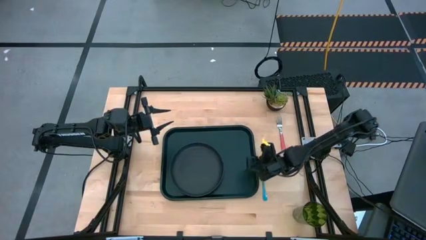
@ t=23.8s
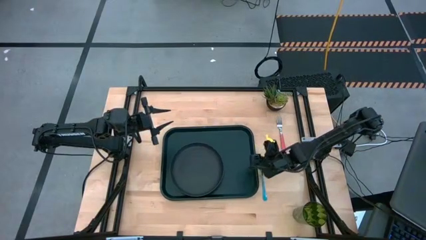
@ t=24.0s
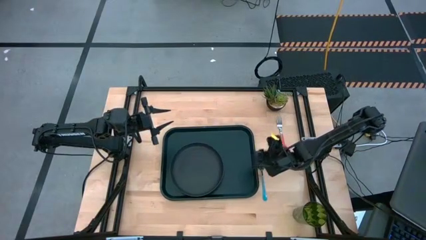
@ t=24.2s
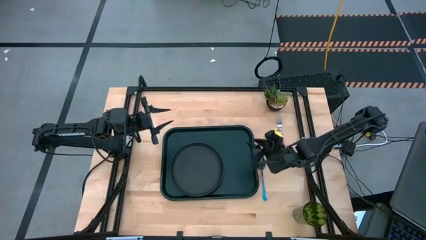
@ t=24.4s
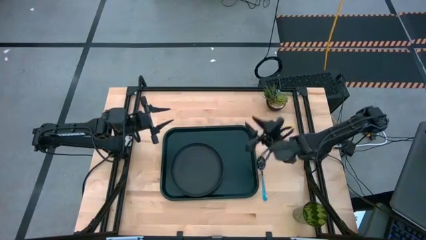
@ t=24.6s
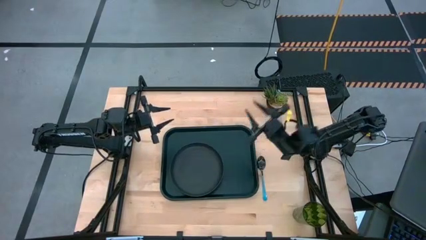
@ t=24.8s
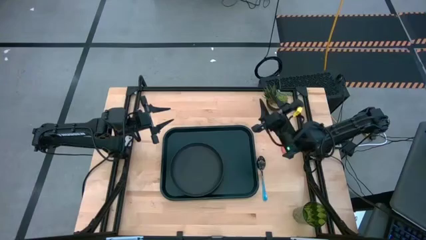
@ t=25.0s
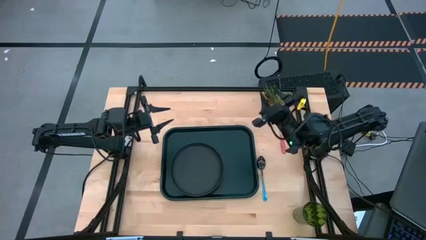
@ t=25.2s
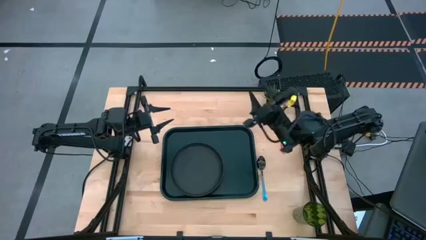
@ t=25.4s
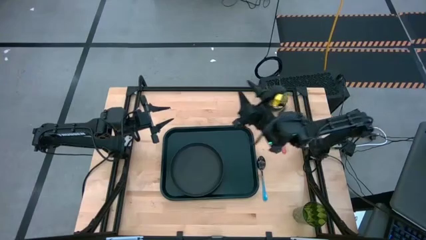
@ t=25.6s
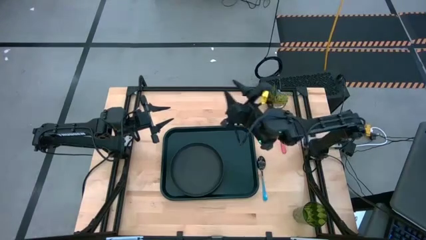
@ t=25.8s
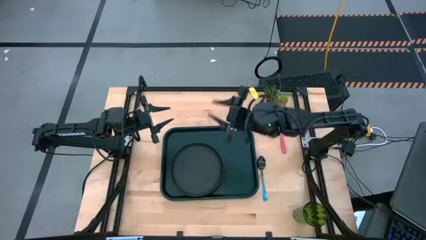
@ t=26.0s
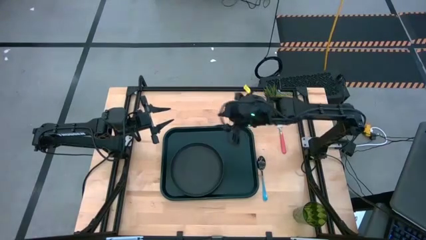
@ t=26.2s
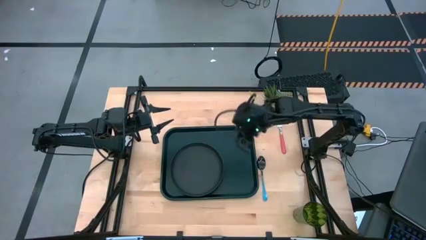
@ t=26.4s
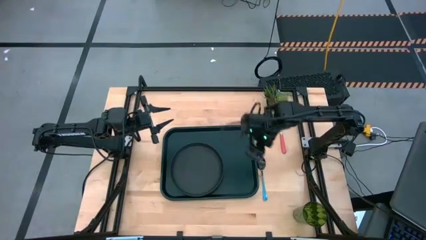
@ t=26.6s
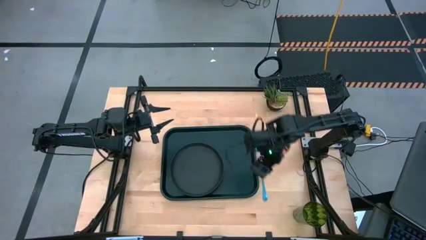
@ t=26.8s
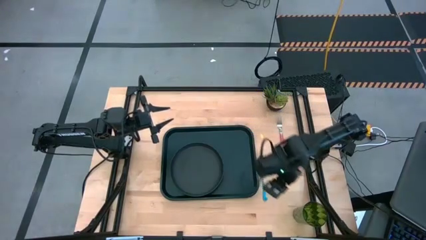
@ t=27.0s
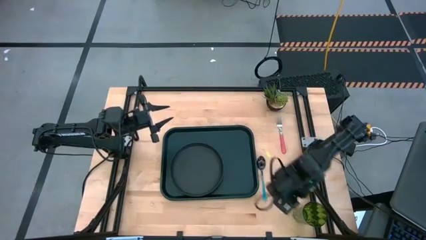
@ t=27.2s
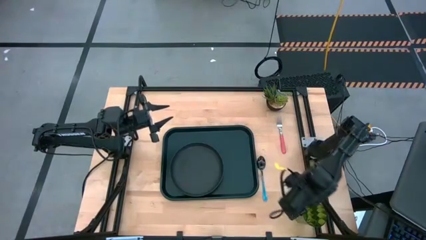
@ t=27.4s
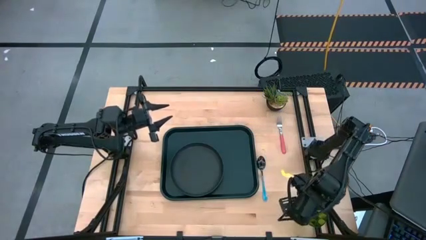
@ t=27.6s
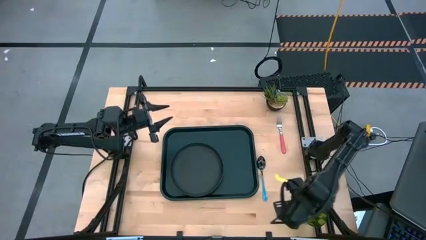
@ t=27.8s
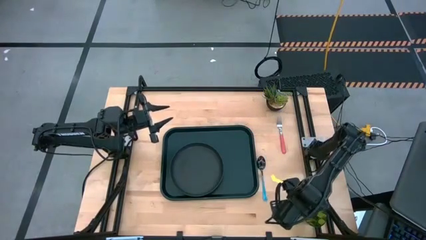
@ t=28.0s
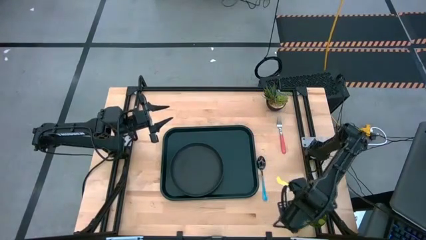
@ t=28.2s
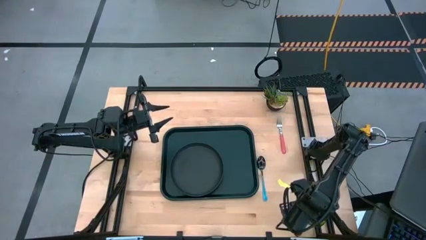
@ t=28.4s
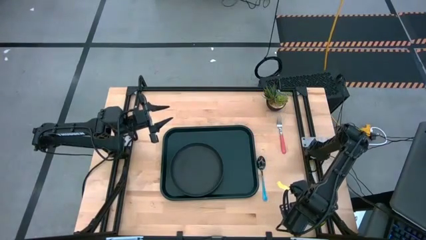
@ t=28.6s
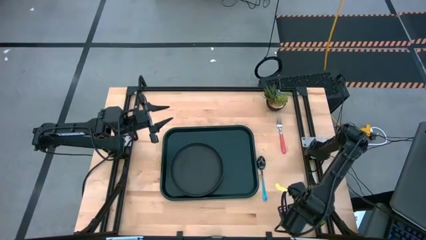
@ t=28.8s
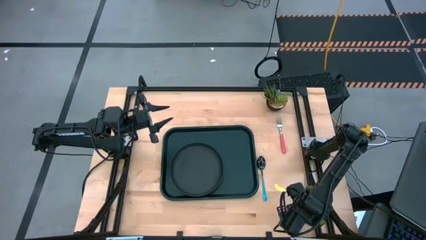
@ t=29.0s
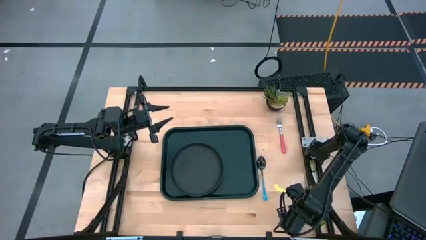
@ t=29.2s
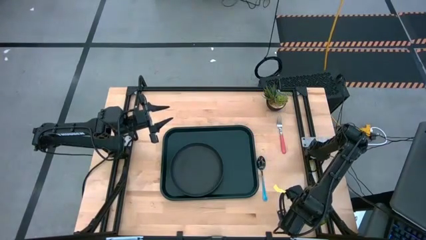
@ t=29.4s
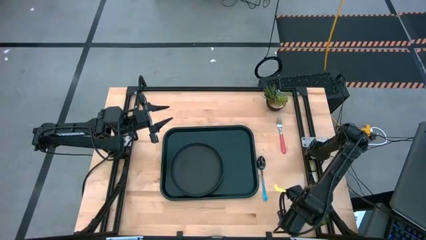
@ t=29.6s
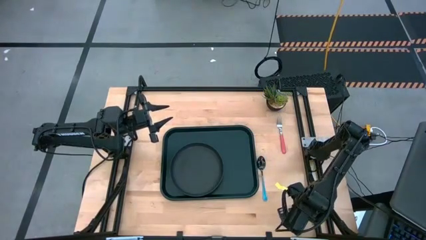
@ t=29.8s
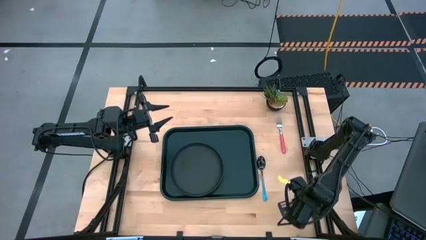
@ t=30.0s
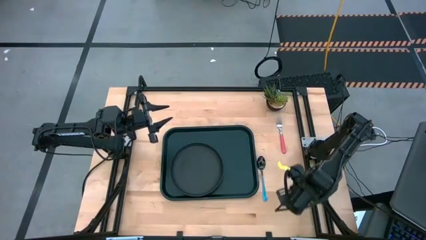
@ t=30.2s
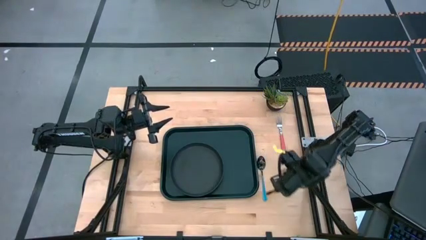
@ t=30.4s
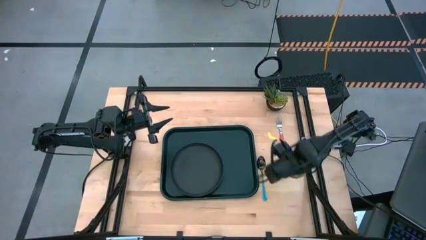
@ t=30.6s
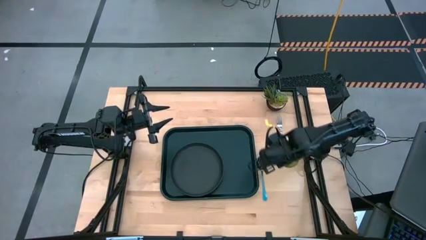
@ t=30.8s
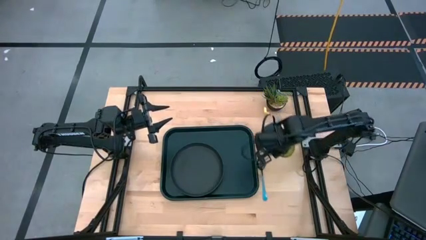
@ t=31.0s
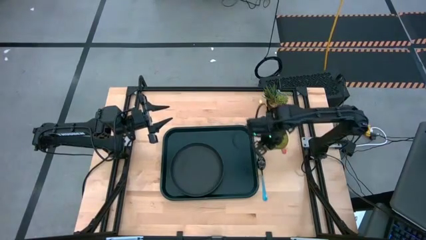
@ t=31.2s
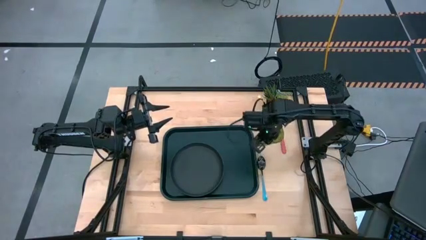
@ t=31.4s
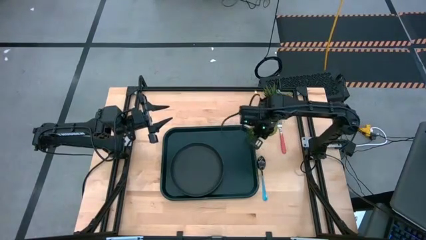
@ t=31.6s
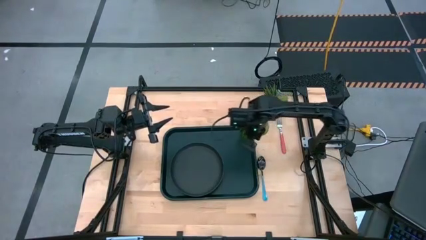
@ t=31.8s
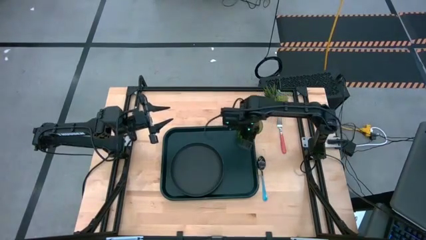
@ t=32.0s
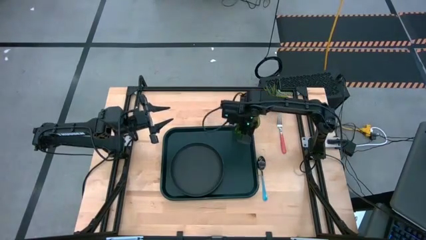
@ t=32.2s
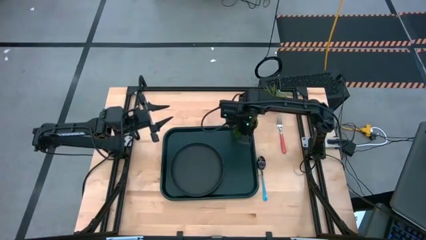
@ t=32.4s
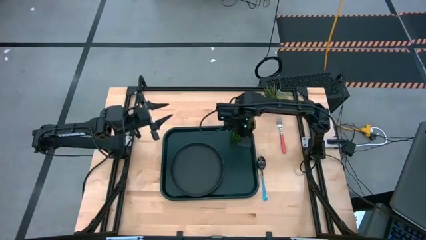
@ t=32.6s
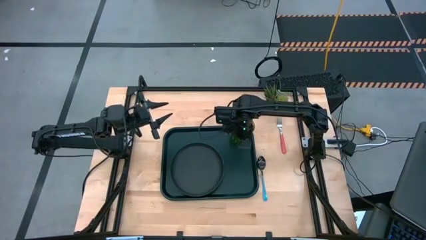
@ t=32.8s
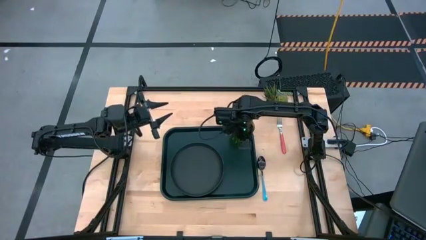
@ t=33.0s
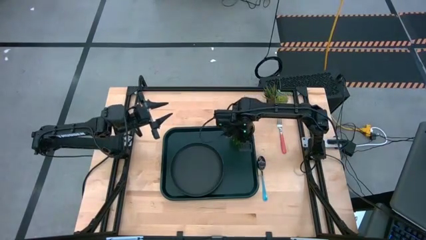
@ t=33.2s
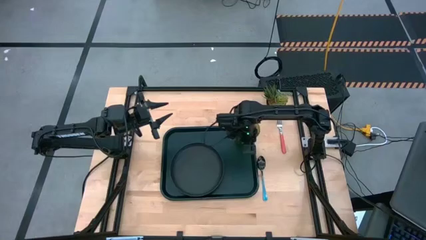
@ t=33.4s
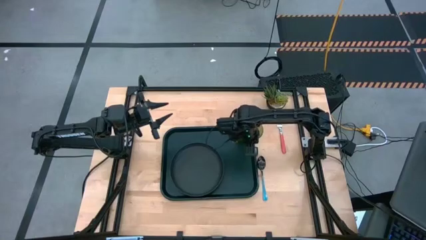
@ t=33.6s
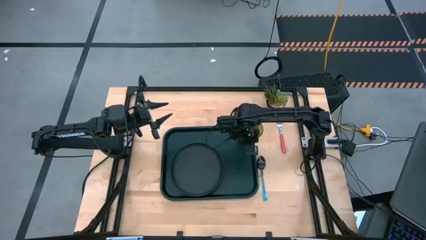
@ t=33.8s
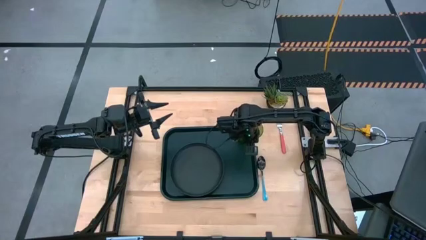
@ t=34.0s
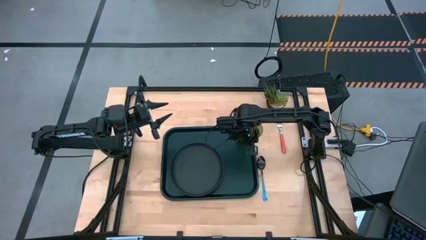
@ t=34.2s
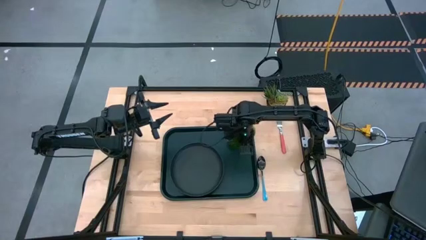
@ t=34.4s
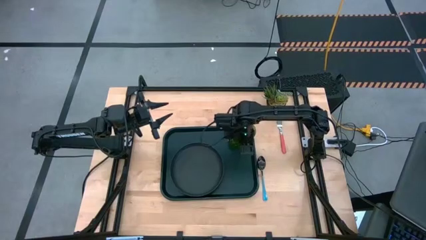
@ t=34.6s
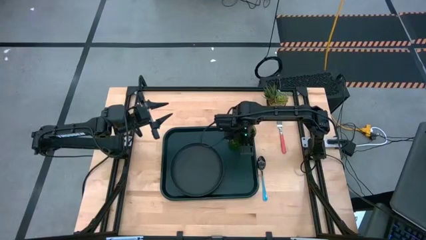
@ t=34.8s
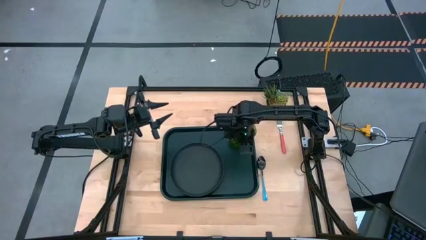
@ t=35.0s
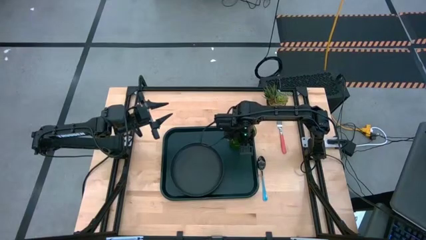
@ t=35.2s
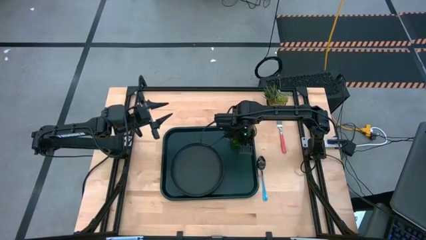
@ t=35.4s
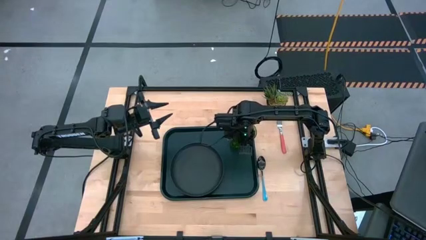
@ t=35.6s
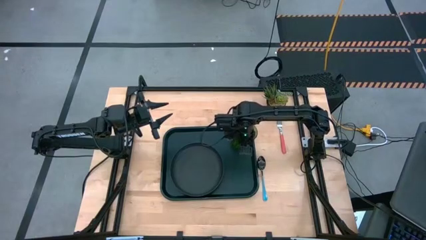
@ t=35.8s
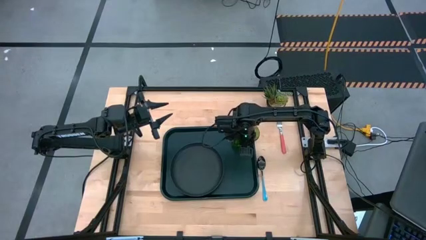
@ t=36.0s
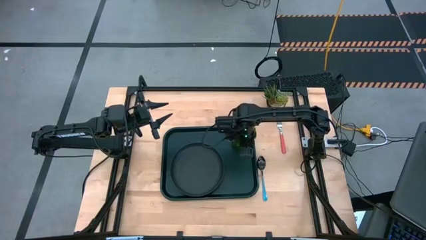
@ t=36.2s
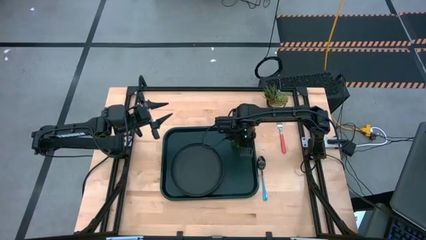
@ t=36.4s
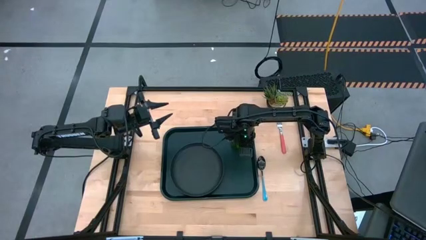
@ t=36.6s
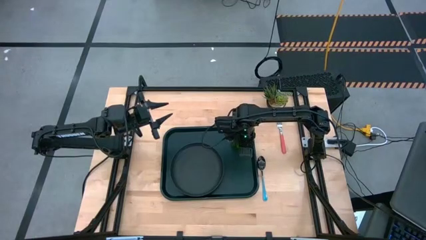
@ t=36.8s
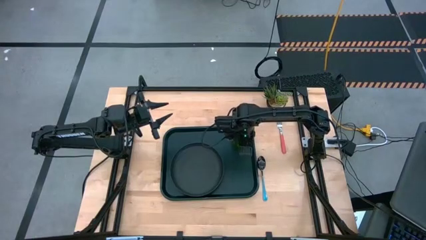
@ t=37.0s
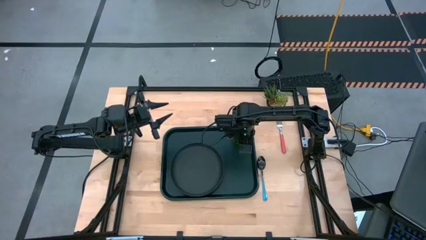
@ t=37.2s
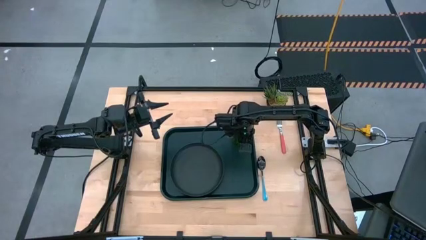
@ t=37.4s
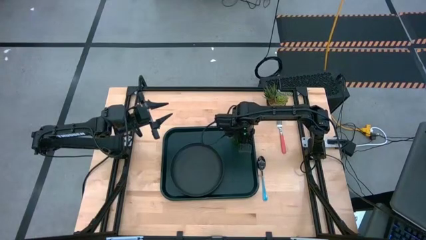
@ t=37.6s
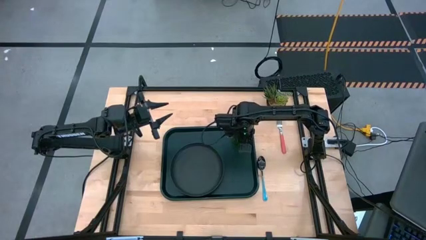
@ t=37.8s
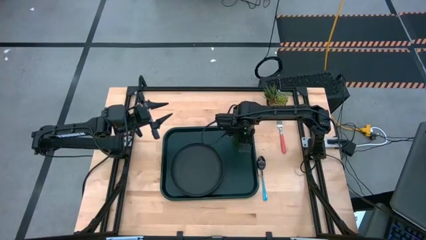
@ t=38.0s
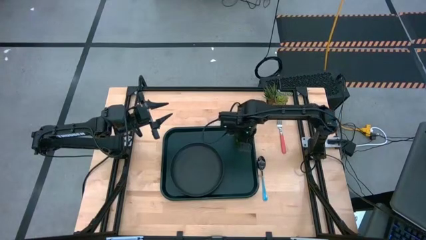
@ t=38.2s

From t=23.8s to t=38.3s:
Task: Pick and place plate/cup/fork/spoon on tray
Put the green cup to the top right of the black plate on the black tray

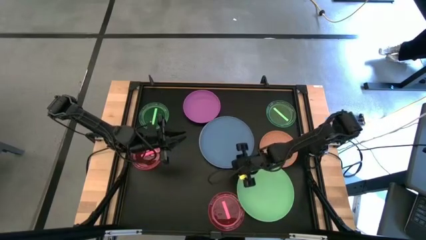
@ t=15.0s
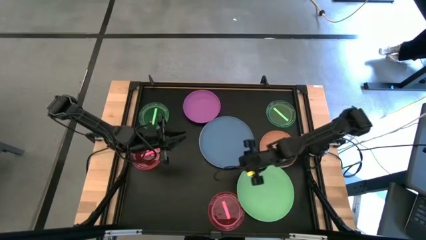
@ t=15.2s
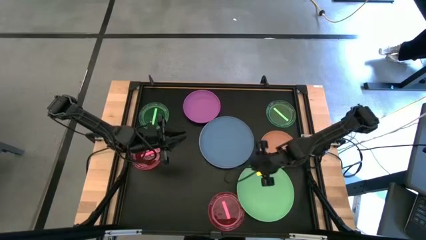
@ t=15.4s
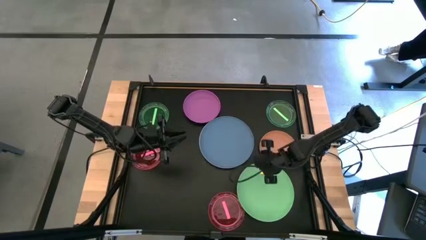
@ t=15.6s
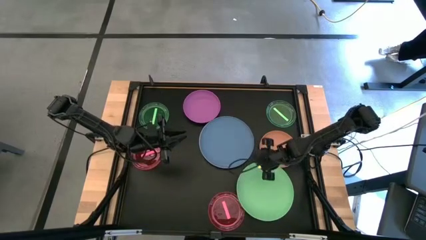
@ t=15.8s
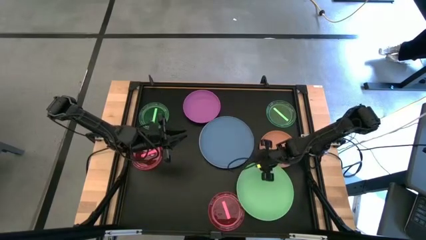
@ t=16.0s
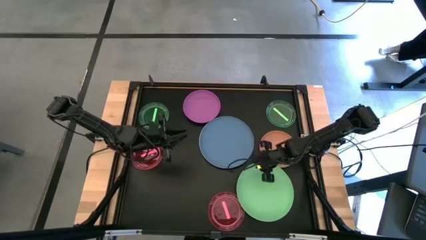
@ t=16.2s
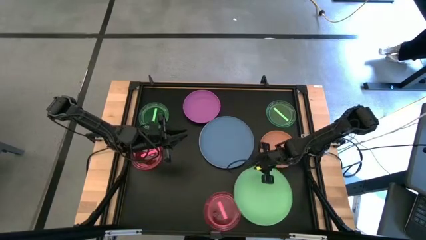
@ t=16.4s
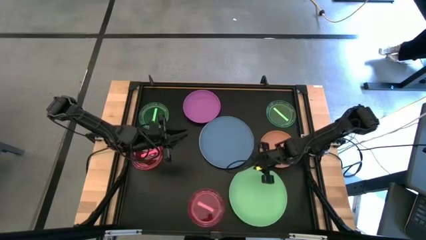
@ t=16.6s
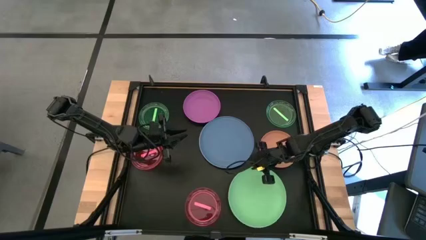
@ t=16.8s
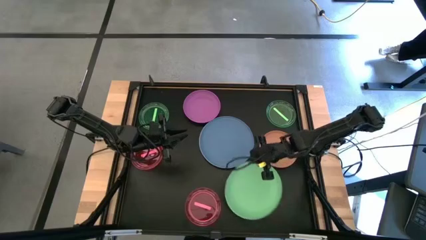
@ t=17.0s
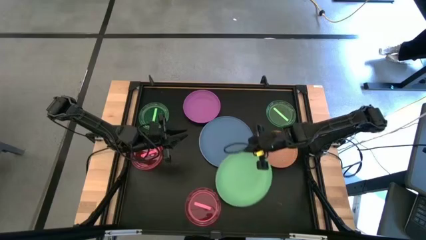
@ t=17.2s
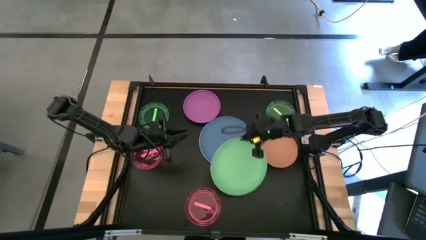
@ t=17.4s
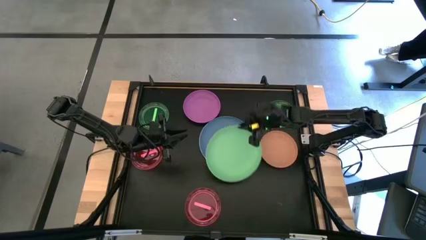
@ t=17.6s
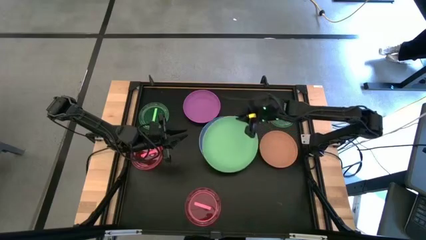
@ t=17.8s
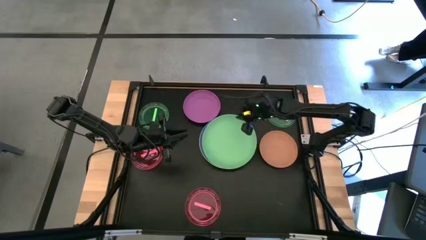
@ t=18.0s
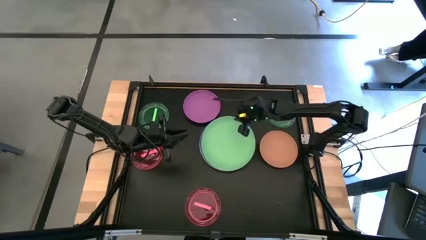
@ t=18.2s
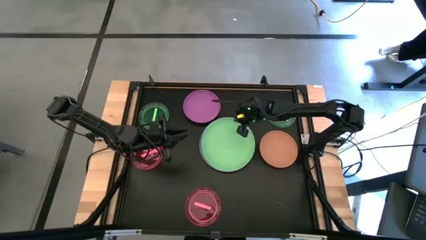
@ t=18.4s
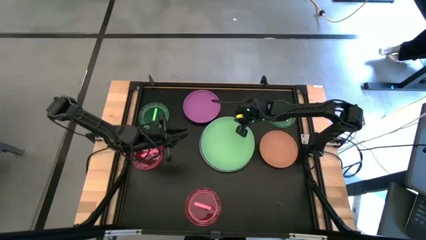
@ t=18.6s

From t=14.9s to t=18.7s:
Task: Stack plastic plates
Stack the big green plate on the big blue plate
